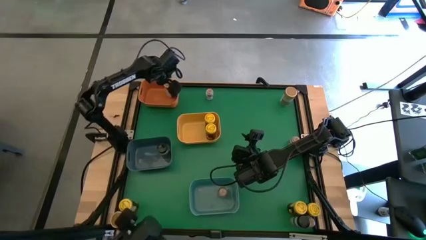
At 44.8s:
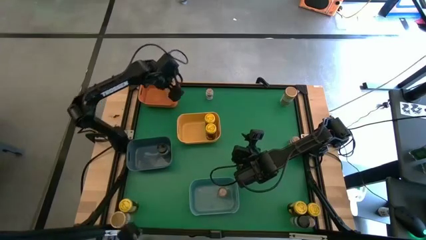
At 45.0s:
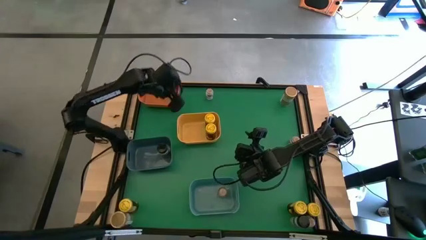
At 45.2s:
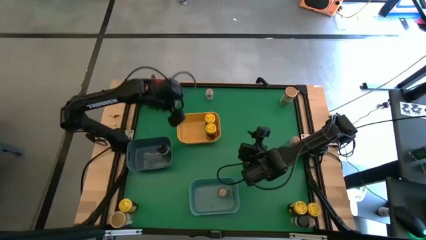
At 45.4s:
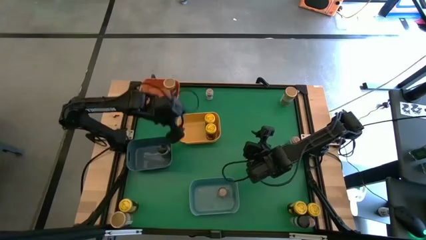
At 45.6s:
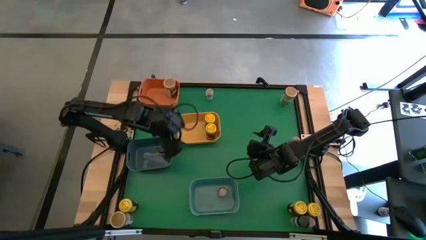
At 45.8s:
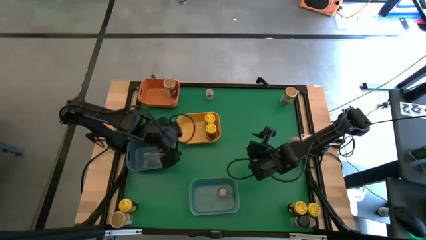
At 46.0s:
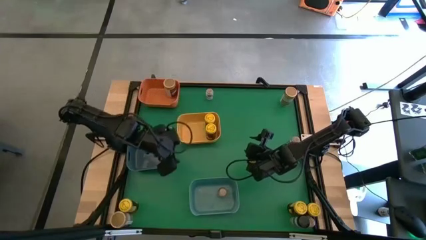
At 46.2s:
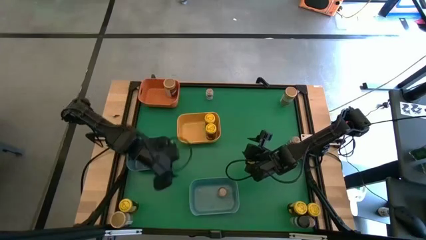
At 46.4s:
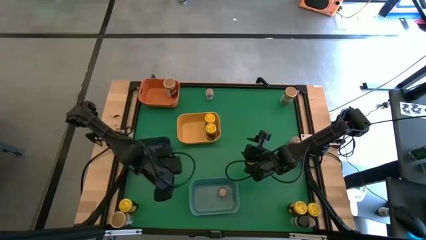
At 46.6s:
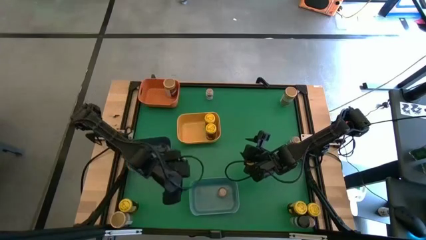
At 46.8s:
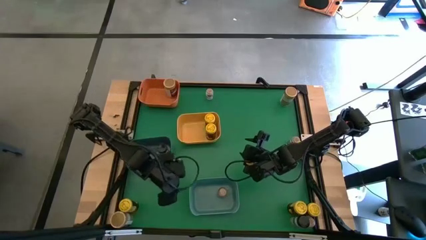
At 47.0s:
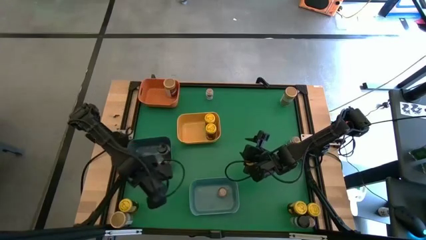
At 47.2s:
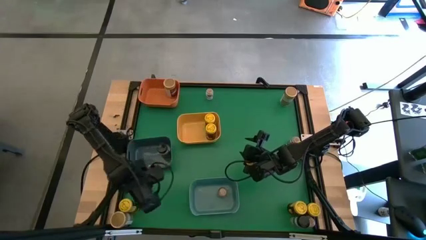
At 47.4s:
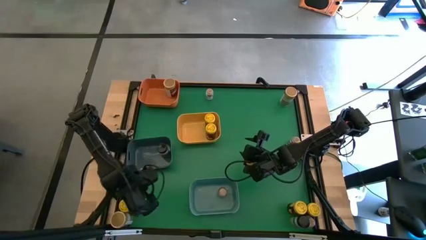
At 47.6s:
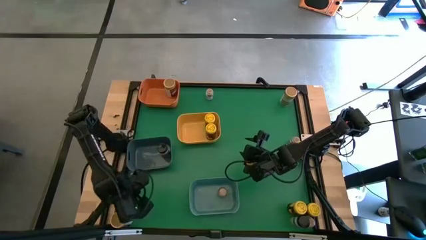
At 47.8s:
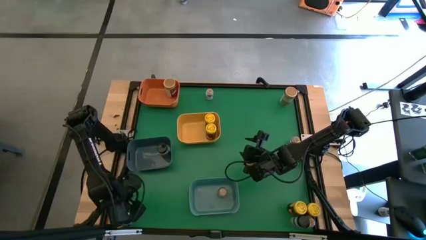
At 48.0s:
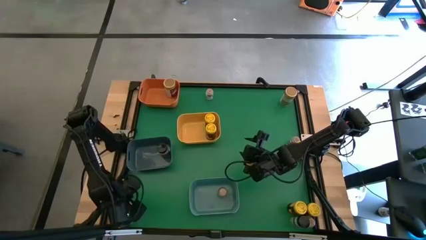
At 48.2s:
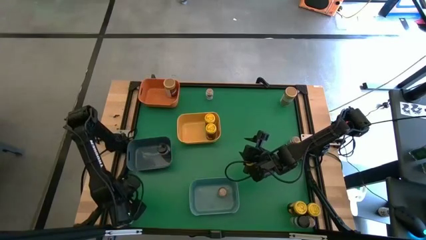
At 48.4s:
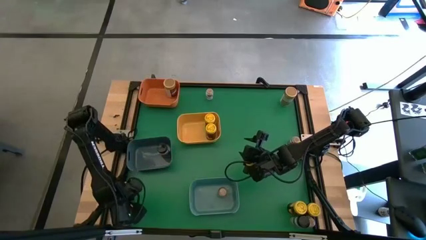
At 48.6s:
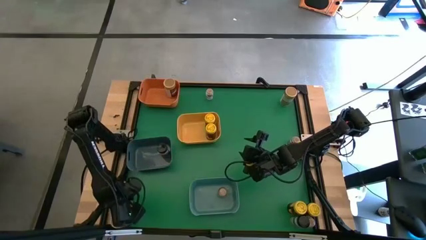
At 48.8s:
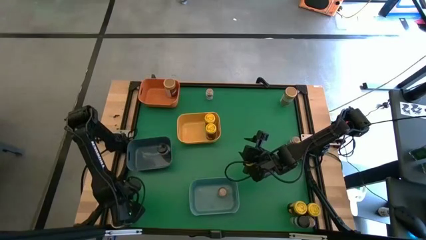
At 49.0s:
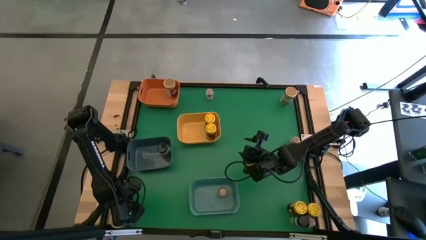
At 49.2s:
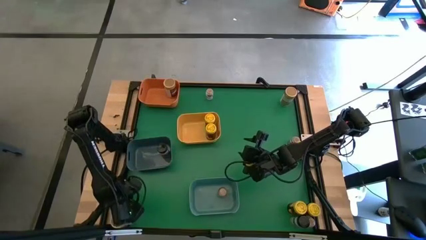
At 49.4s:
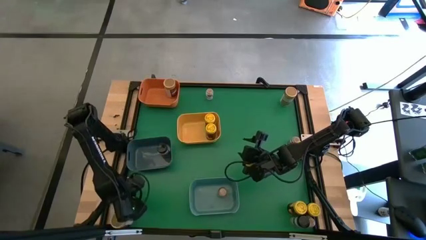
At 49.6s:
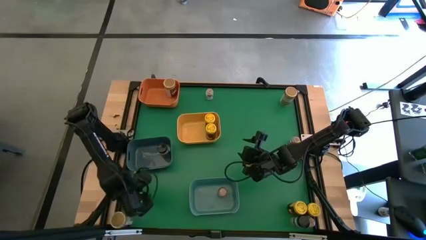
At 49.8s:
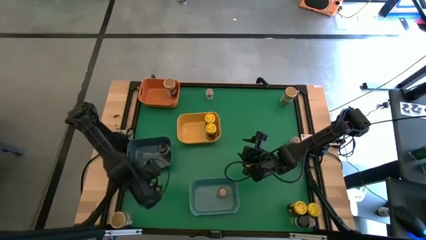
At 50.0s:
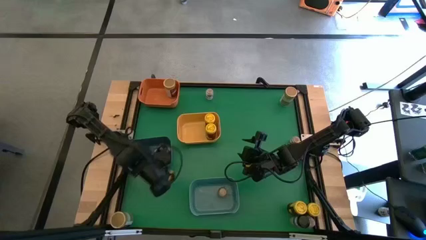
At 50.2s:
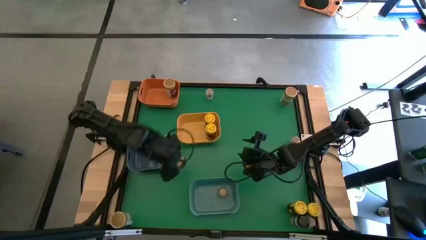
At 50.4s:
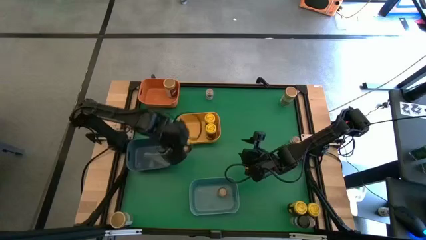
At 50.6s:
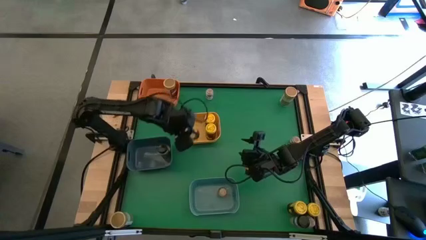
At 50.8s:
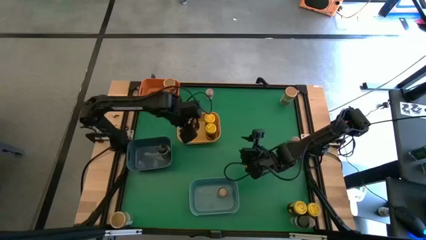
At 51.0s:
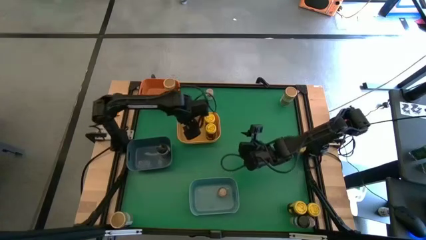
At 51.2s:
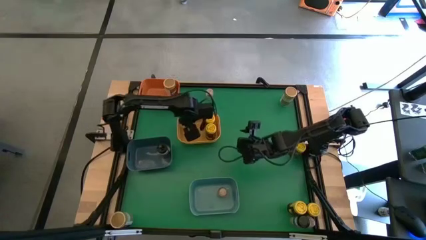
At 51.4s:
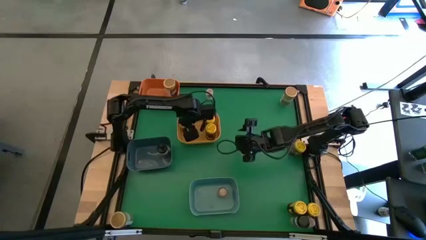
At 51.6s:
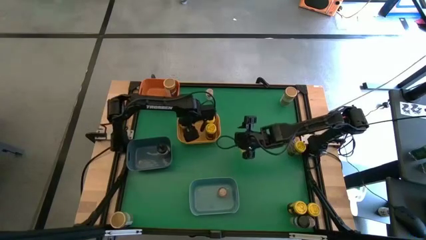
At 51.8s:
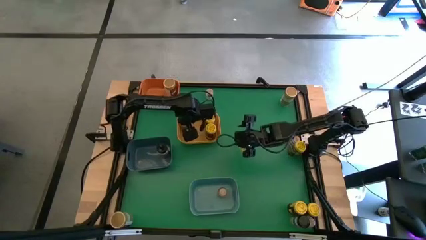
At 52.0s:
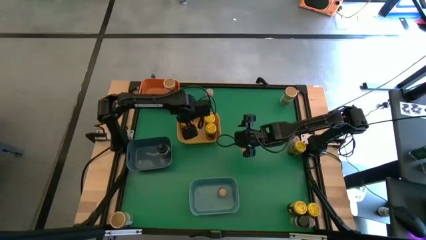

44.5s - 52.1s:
Task: Sort spices by type
Put the yellow seasoning bottle into the yellow bin

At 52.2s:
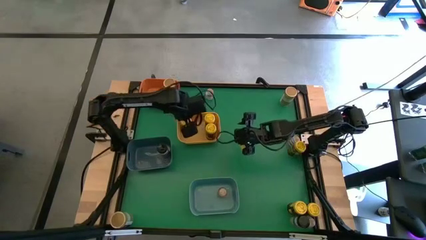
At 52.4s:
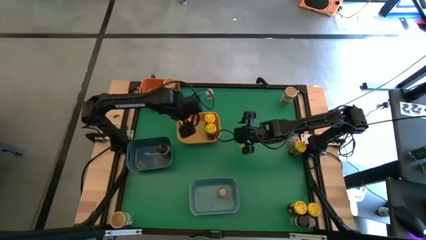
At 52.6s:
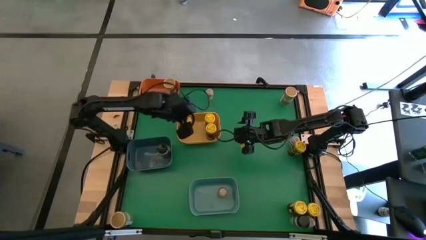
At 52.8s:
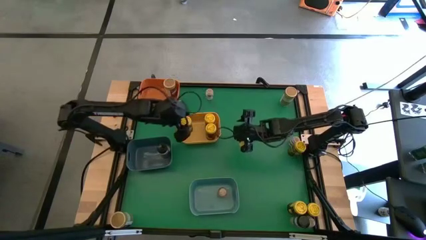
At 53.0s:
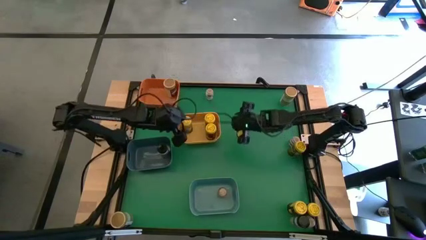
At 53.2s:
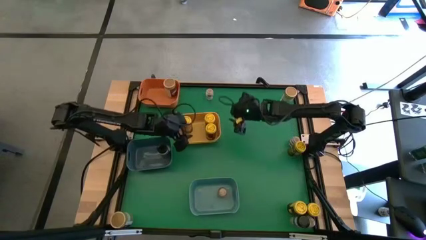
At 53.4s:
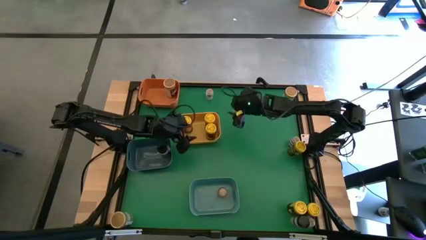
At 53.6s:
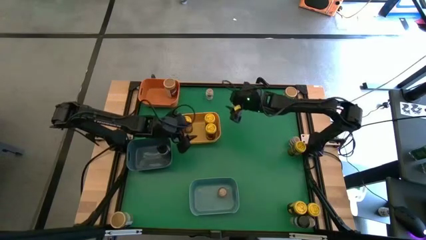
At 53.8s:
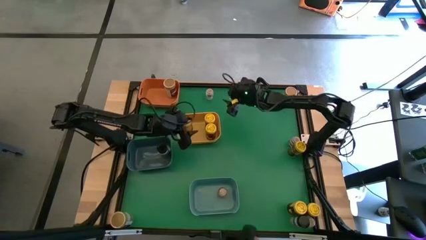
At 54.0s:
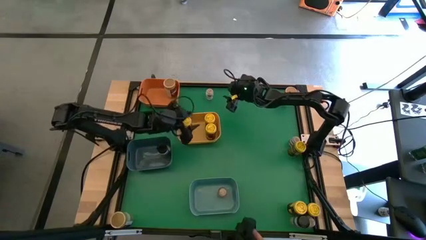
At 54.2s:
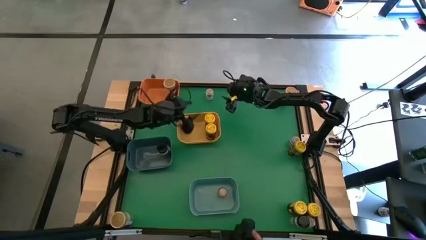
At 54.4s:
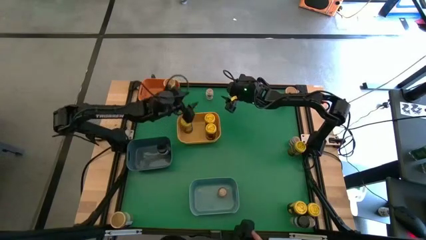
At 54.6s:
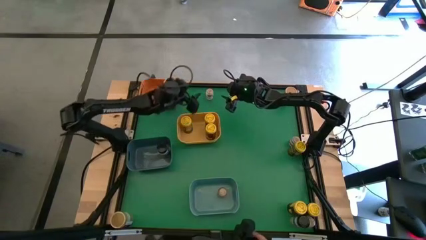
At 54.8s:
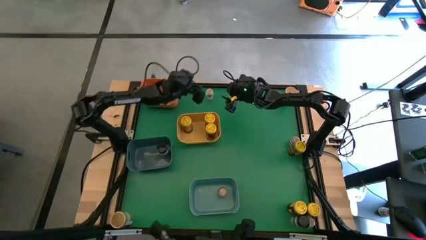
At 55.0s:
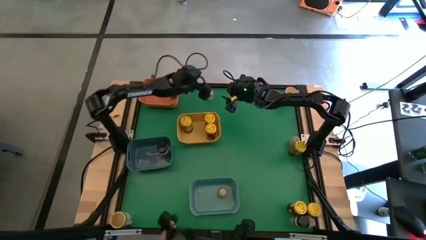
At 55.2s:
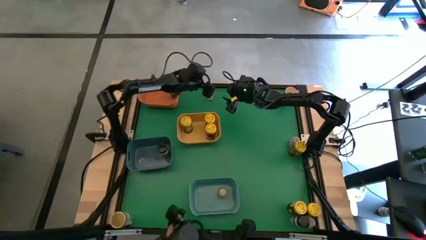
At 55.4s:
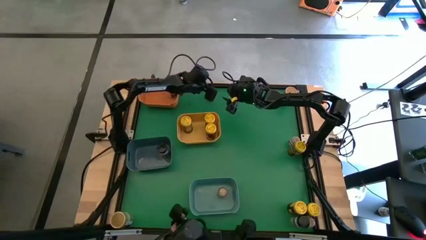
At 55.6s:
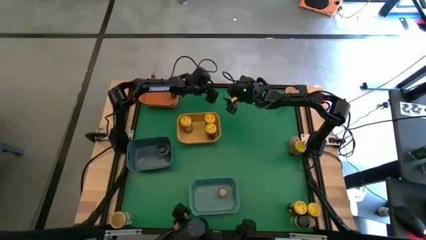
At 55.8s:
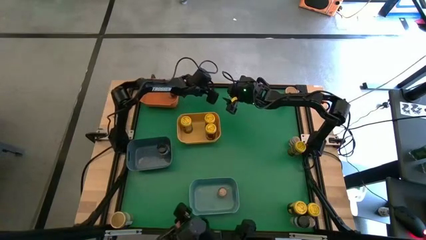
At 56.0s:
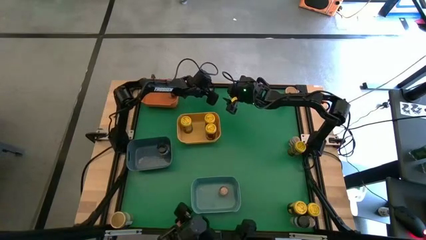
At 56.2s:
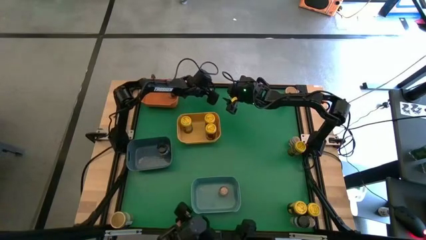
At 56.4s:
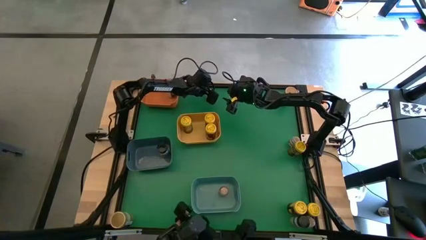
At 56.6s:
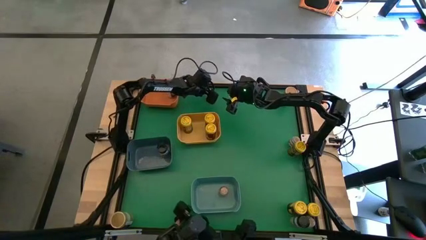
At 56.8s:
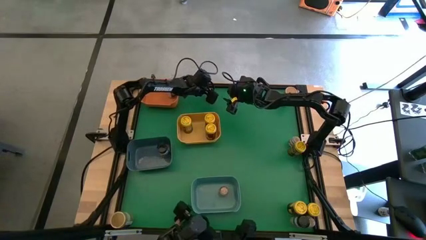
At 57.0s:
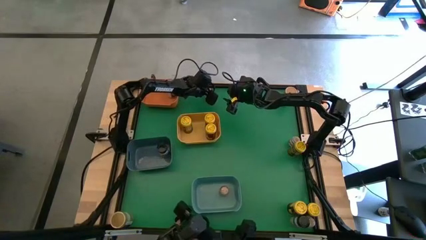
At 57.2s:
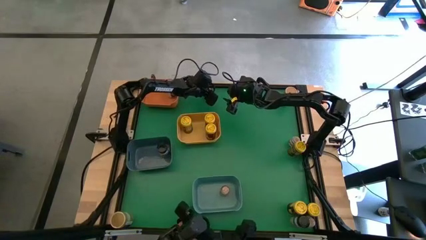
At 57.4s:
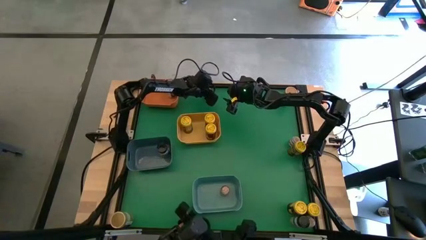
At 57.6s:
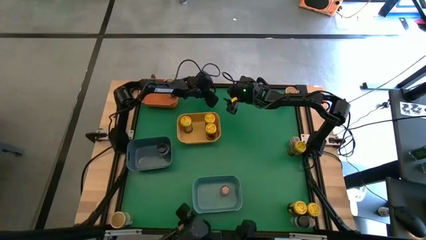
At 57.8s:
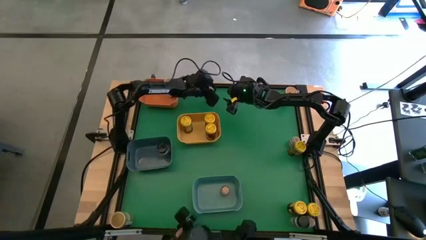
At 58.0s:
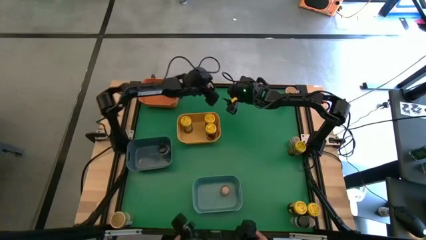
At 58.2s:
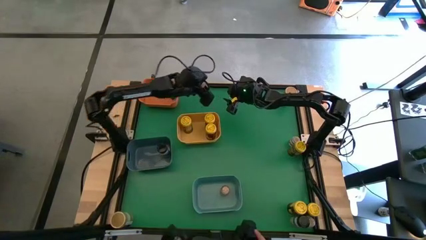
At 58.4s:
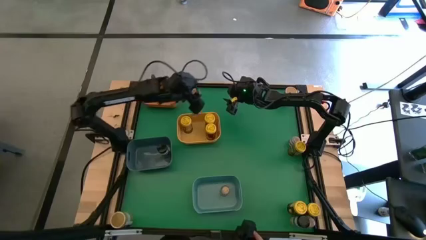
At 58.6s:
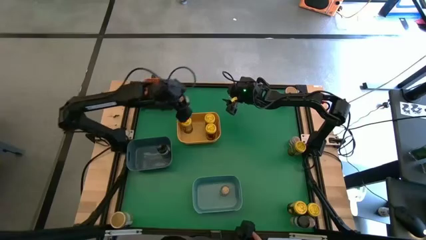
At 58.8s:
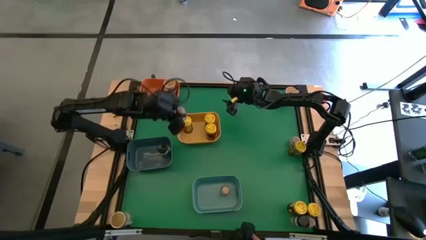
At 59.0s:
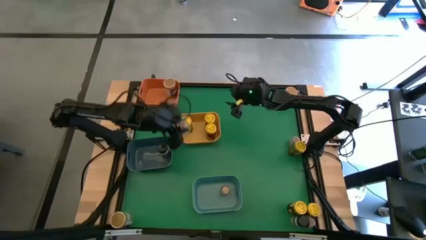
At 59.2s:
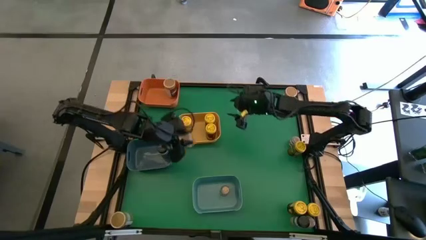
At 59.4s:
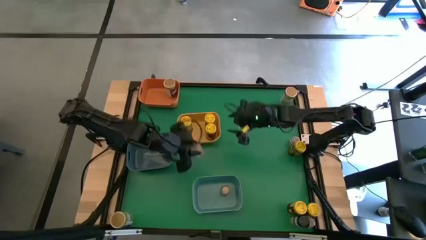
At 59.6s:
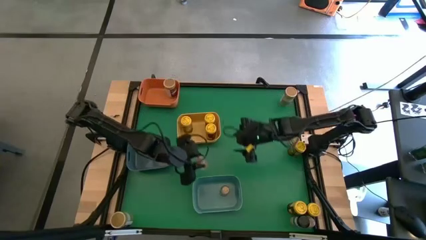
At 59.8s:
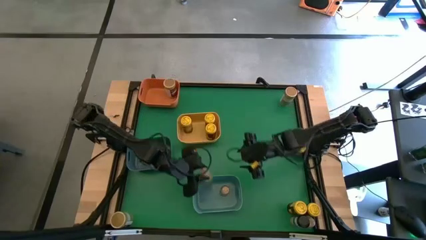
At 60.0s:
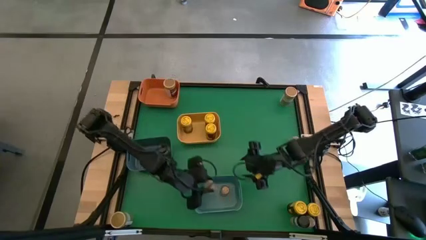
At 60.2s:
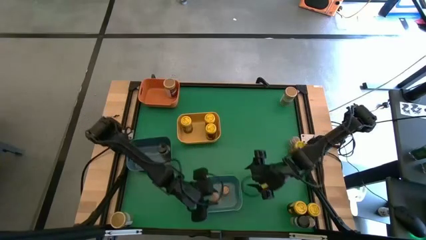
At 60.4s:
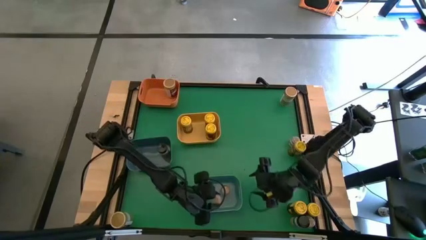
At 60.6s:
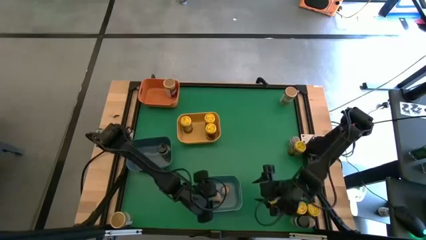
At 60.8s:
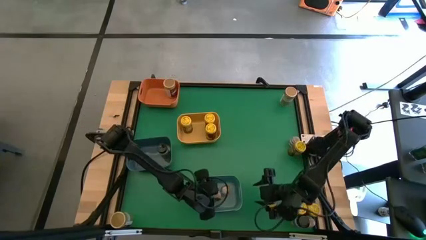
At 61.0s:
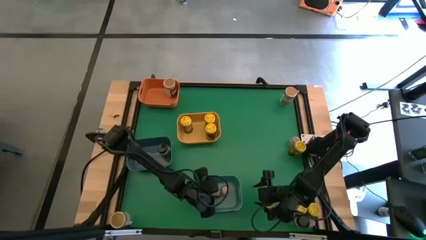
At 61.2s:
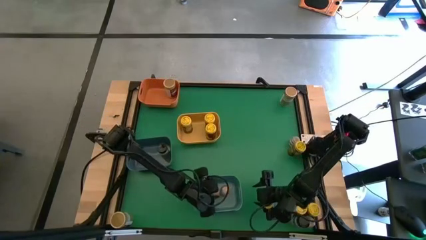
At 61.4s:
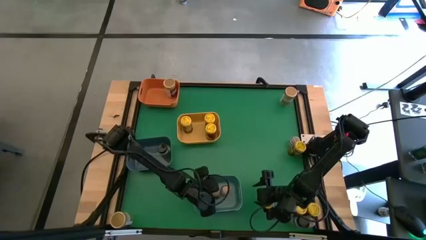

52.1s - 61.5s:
Put the white transparent seasoning bottle into the light blue bin
